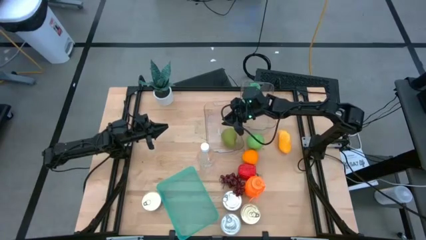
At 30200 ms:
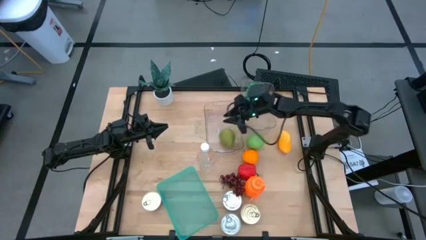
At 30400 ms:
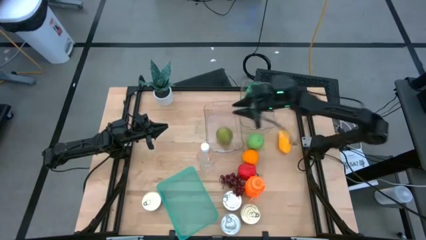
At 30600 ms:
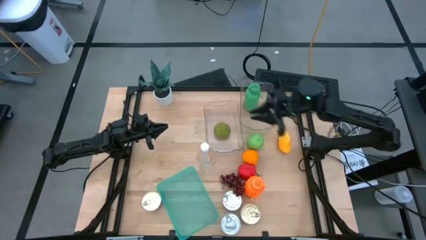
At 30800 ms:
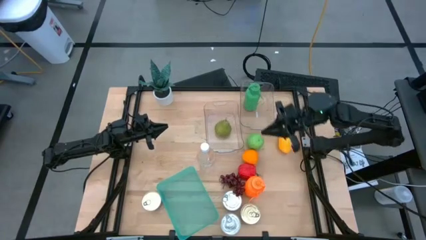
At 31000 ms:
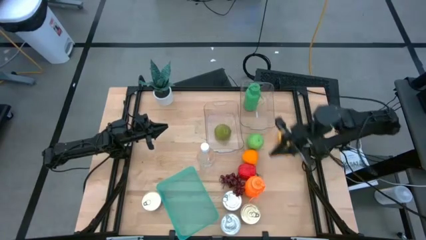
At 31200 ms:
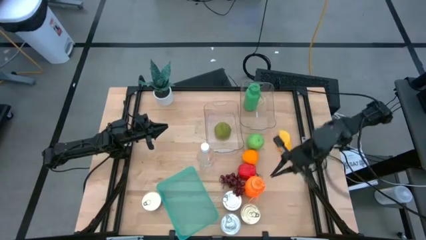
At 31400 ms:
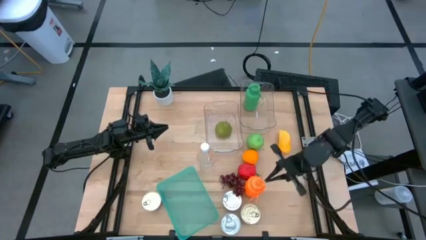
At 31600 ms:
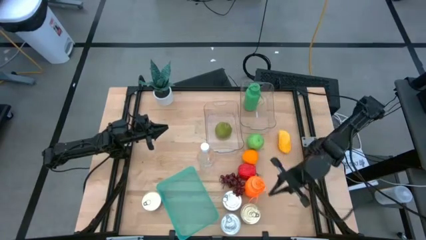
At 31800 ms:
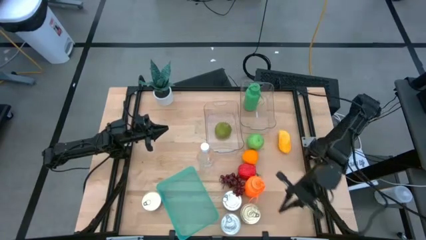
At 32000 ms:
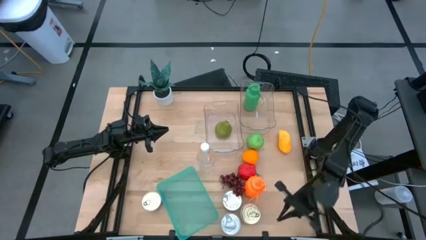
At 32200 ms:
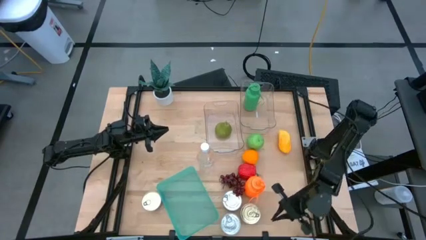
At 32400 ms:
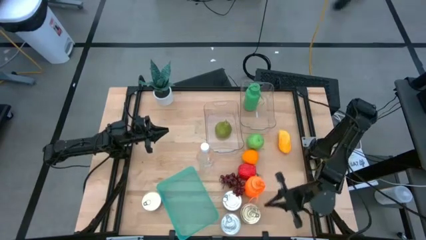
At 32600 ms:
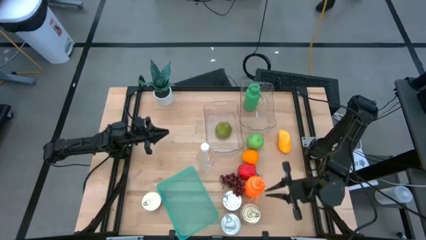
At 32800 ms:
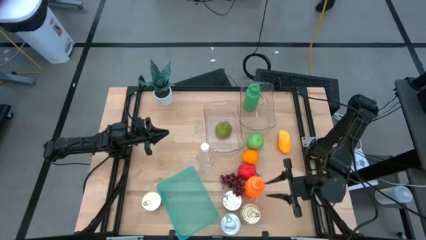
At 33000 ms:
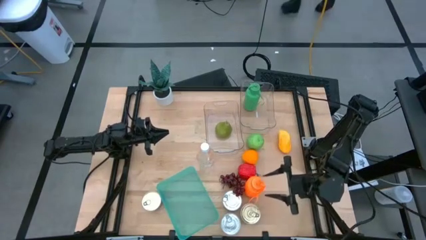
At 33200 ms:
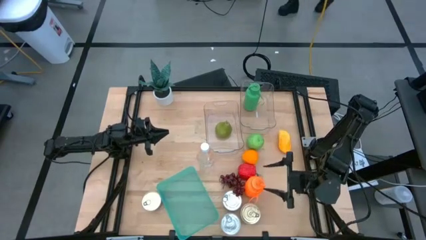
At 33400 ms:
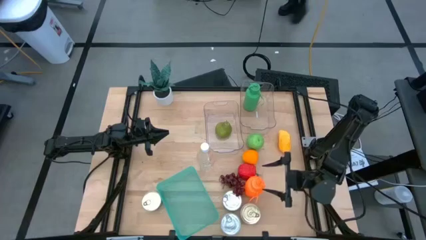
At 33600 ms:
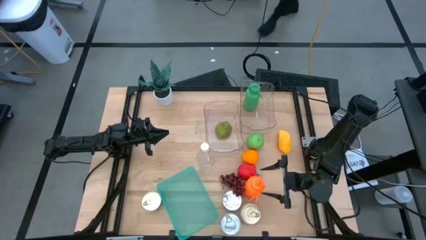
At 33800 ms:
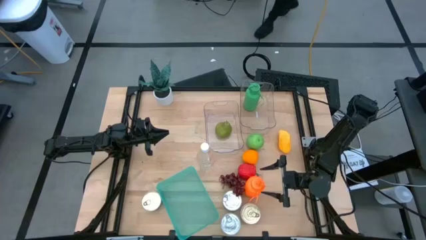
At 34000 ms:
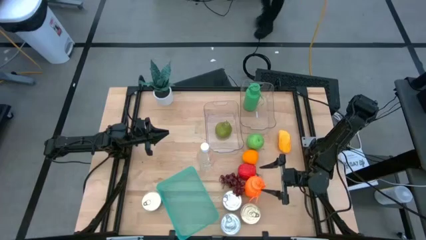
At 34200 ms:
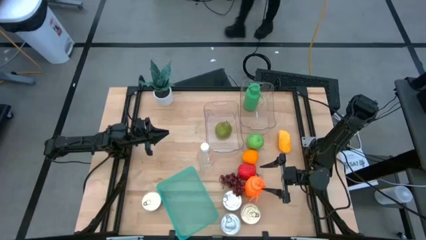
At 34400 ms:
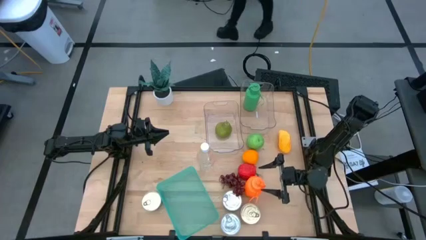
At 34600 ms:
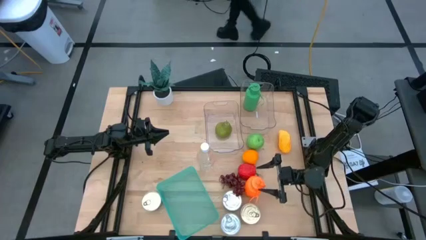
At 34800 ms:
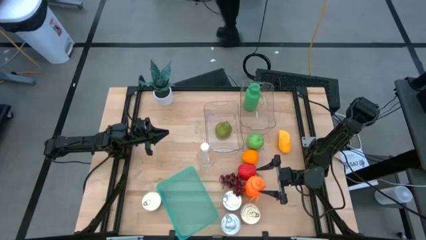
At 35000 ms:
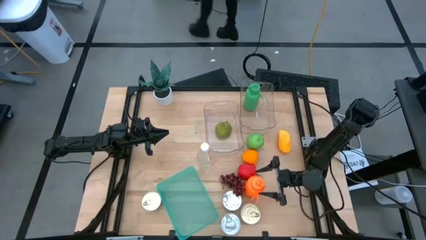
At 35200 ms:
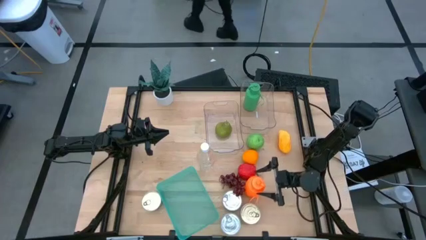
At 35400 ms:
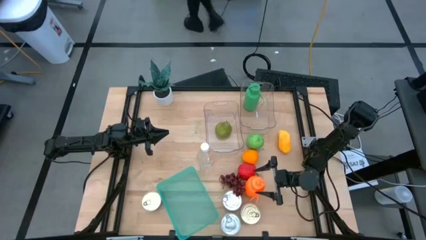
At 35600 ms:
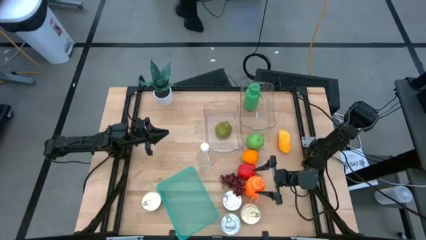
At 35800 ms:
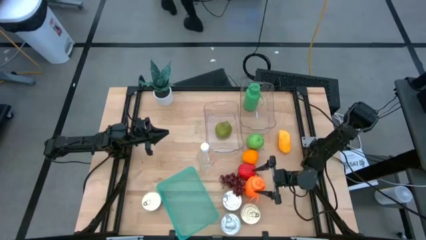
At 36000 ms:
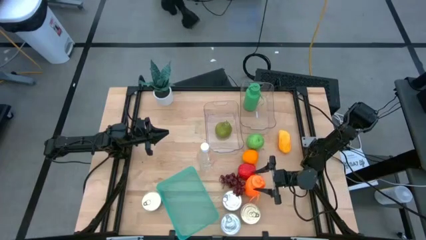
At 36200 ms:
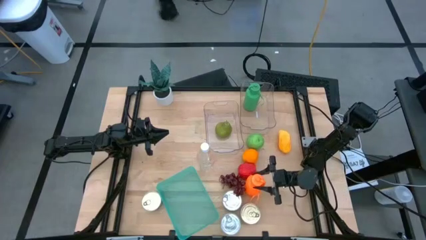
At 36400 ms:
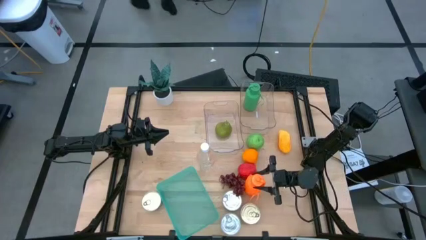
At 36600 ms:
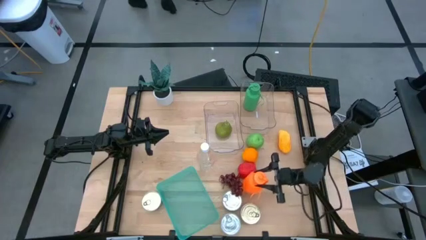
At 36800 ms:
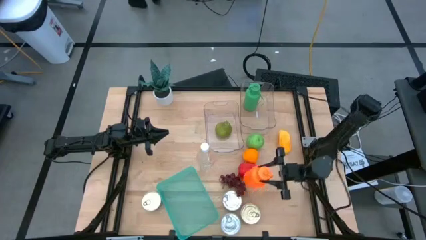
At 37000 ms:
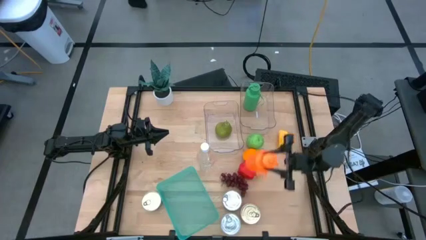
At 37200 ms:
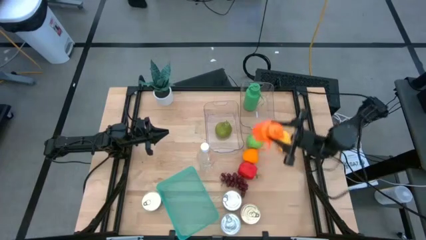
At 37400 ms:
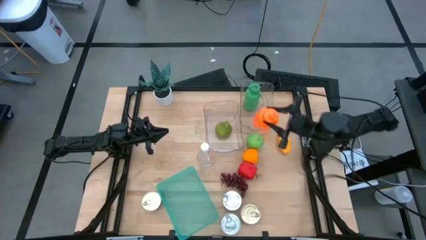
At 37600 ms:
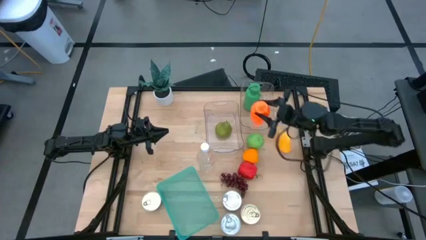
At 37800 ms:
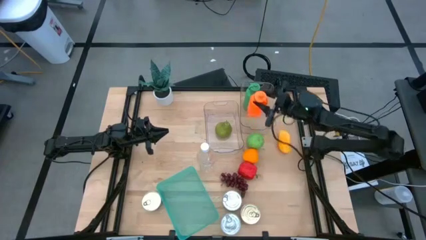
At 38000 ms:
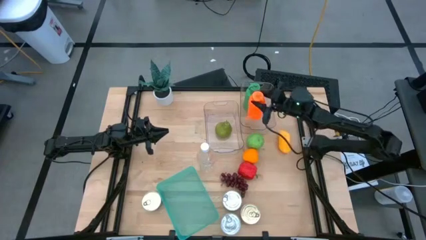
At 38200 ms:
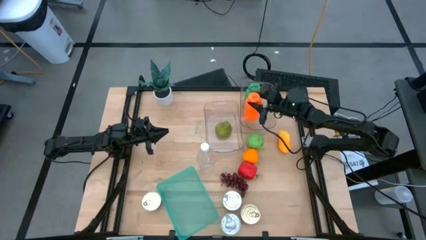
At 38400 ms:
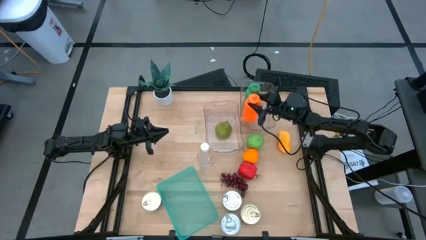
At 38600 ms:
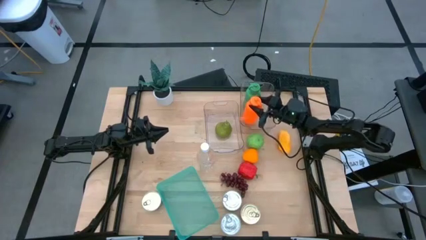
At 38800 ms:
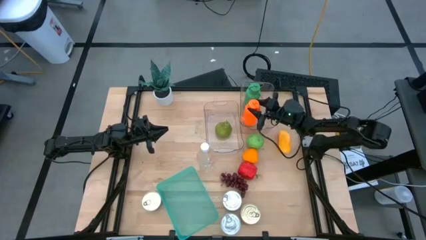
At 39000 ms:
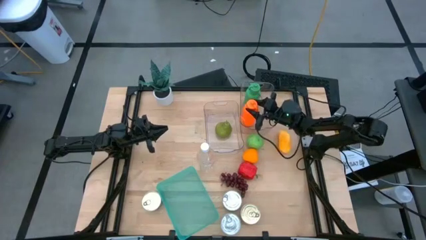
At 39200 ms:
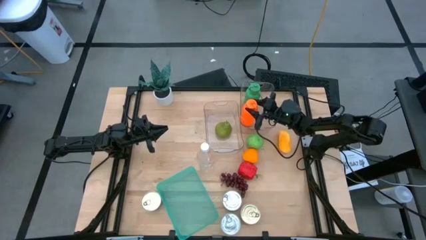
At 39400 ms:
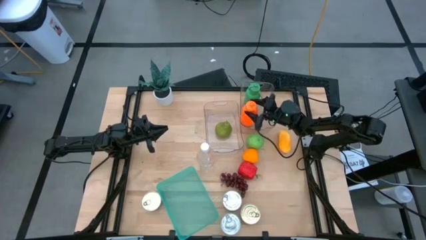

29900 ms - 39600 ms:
Task: Pick & Place Food Item
Put the orange water bottle into the top transparent bin

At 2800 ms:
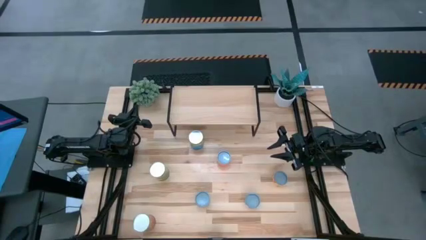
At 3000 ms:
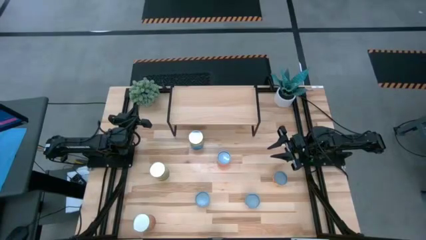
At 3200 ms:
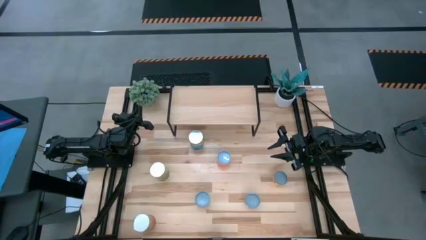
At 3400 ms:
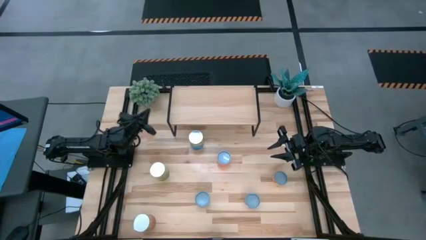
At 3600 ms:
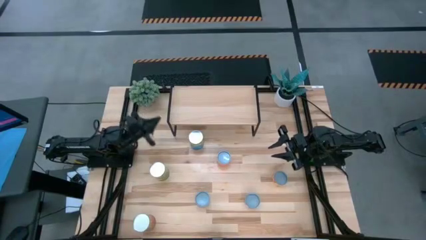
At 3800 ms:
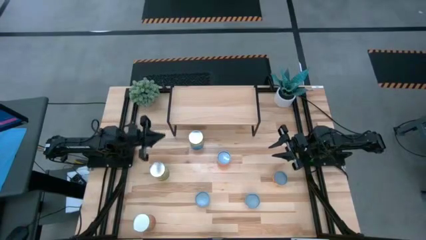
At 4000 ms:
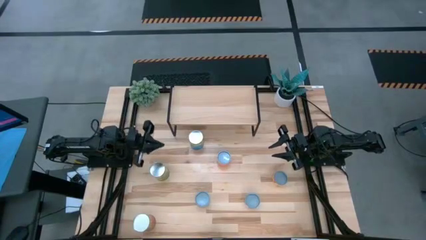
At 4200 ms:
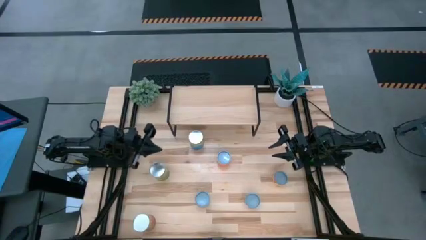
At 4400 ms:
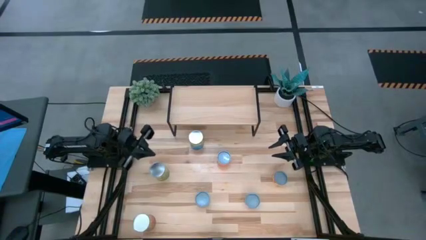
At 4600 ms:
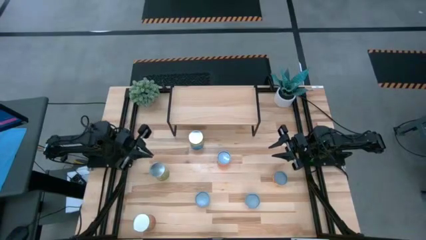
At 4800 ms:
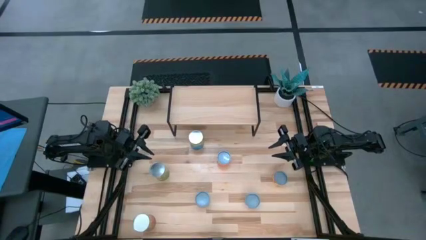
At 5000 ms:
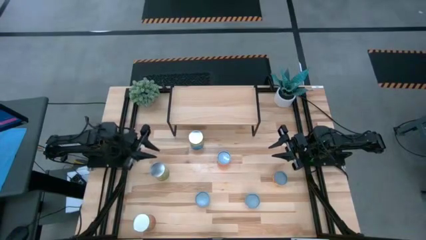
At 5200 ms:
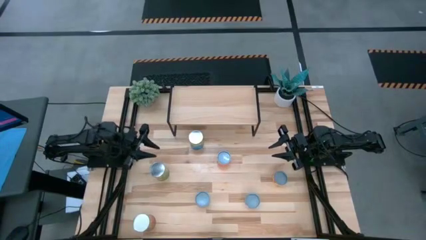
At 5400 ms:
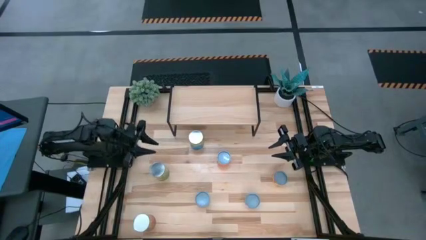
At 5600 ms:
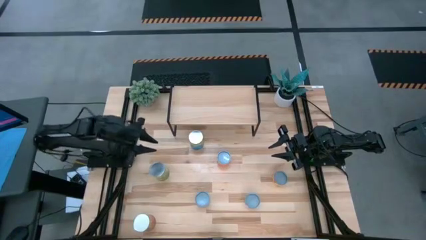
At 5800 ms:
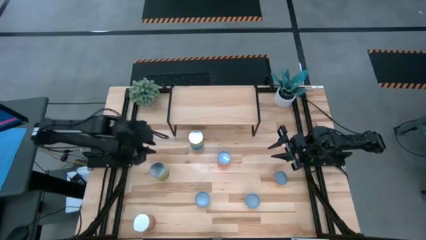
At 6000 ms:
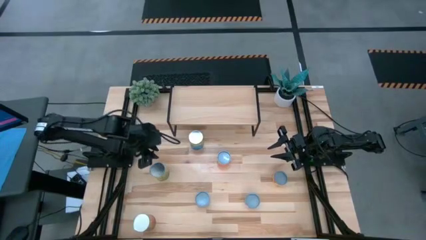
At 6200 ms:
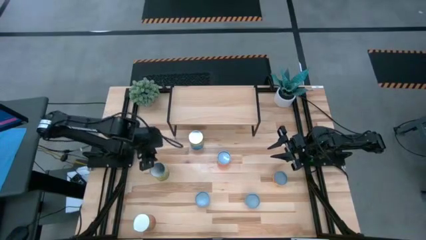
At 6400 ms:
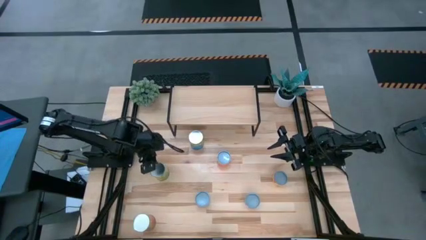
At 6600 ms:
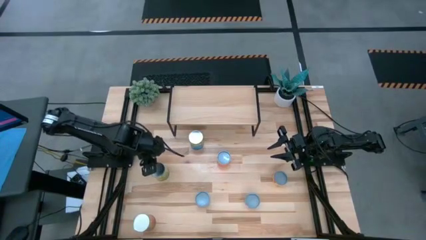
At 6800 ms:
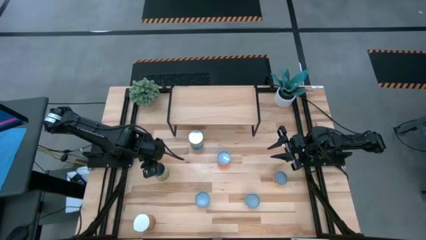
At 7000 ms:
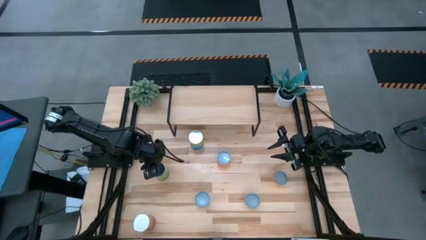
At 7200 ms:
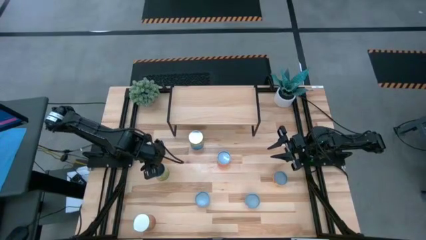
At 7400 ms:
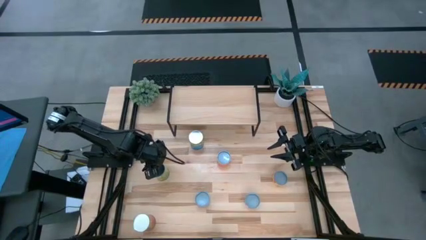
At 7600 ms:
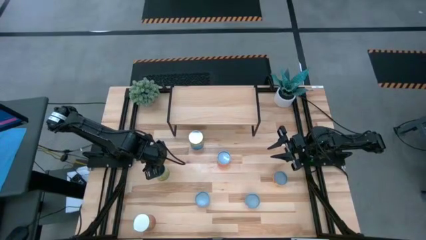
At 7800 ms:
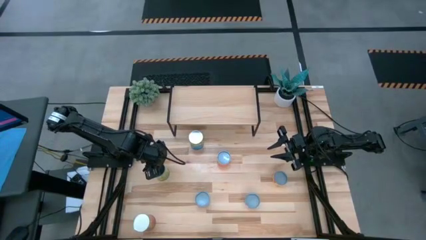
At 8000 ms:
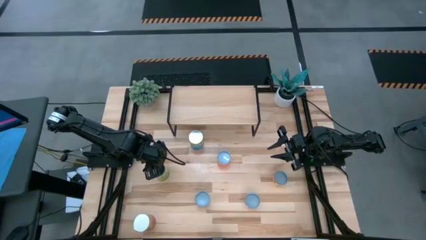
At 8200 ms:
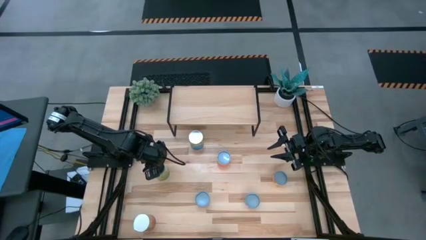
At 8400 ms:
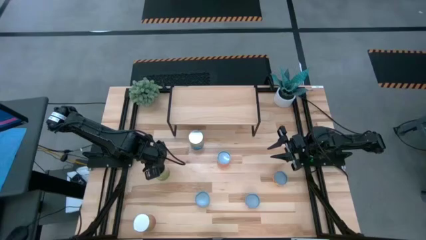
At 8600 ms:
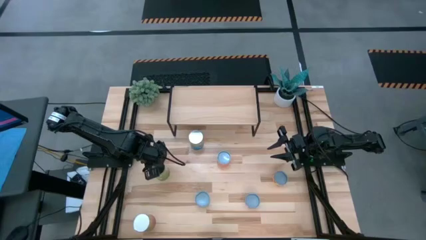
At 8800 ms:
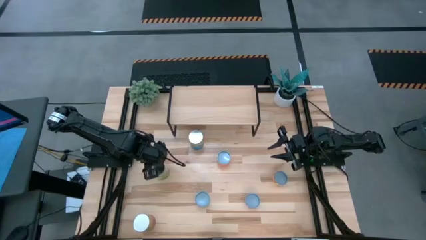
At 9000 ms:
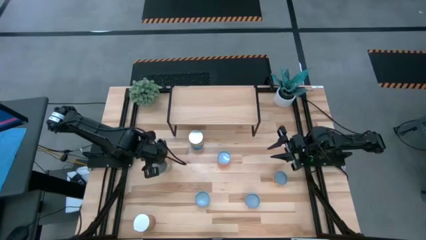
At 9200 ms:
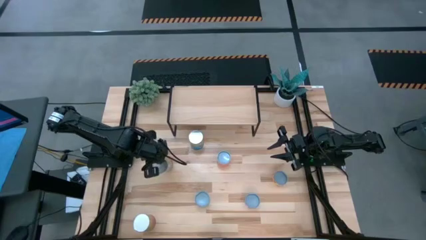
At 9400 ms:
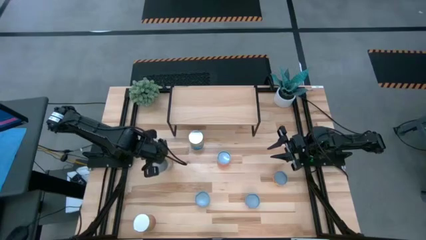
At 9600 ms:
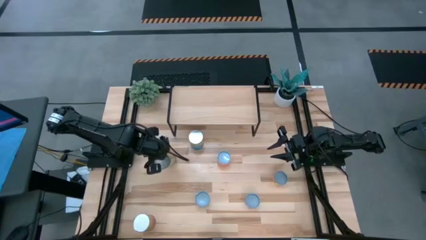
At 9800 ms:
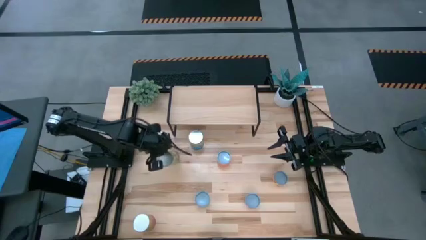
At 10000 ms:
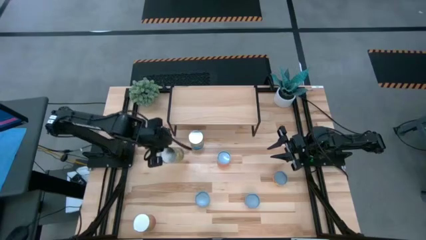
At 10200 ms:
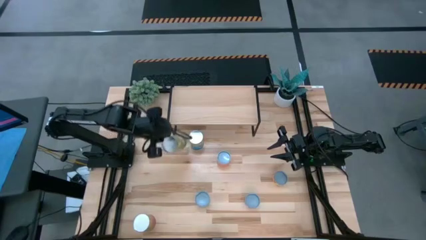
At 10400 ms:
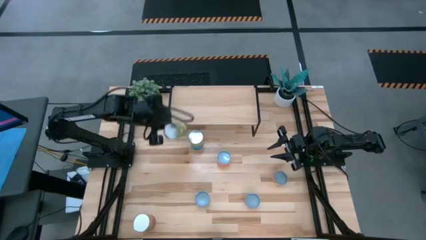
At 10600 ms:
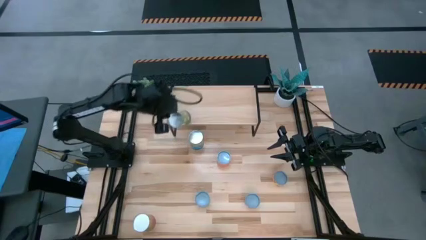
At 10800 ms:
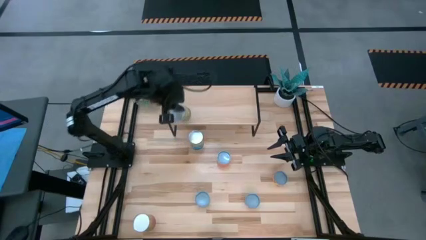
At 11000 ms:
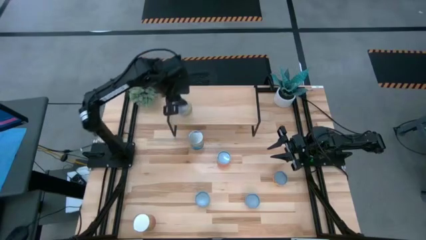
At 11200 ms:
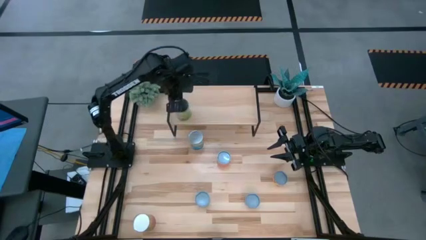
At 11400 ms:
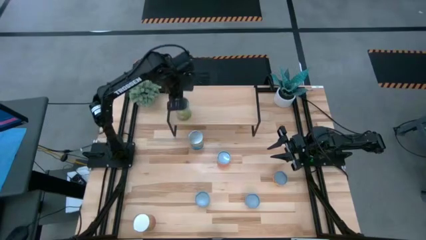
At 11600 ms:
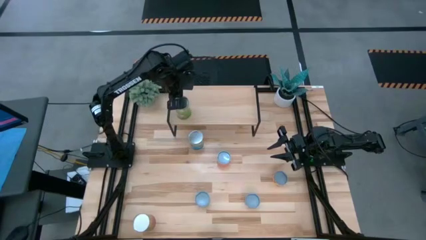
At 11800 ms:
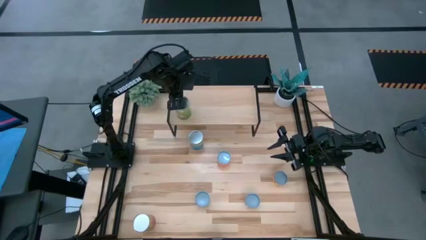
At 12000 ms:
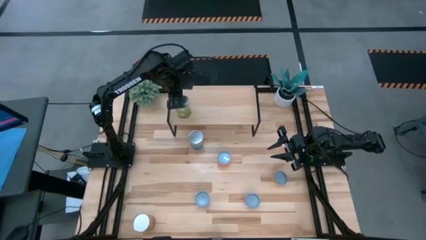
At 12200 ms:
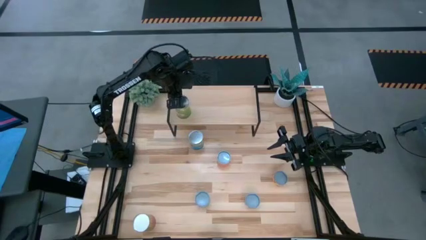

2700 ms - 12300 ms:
Task: Pick and place cans onto a shelf
Put the canned pears on the shelf
